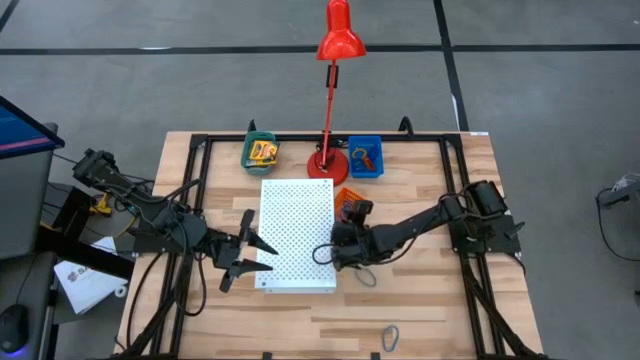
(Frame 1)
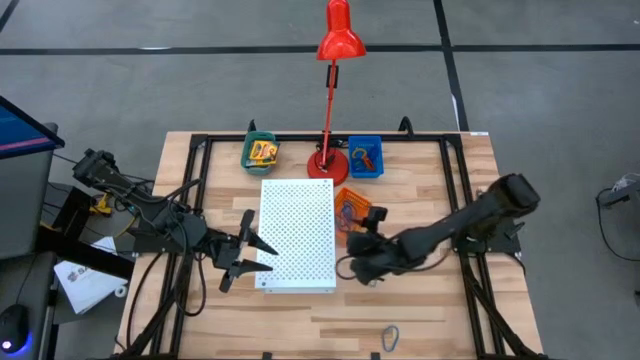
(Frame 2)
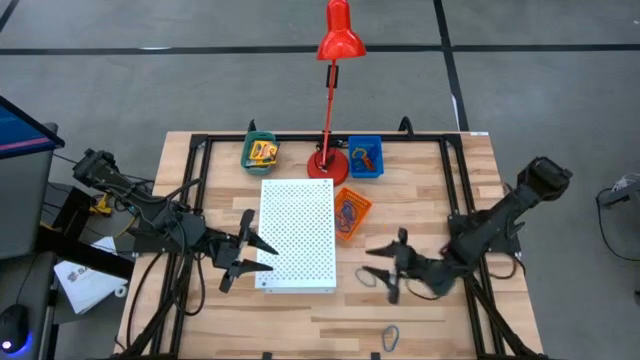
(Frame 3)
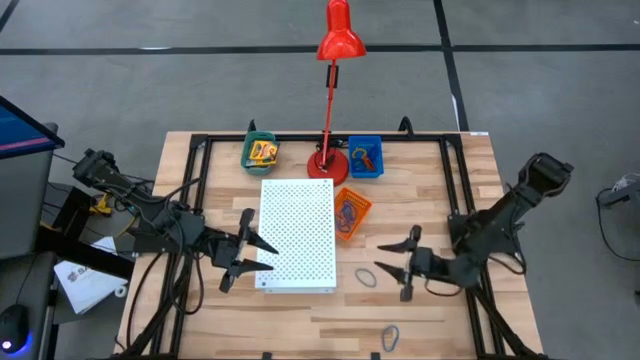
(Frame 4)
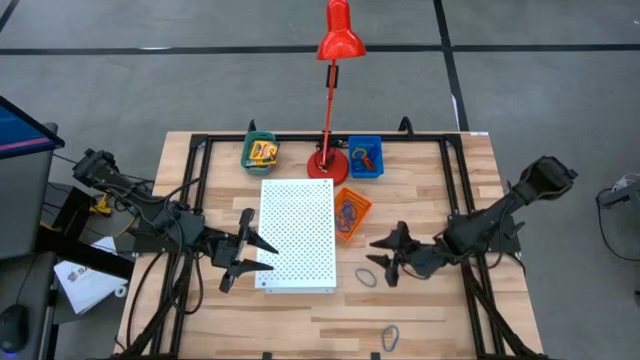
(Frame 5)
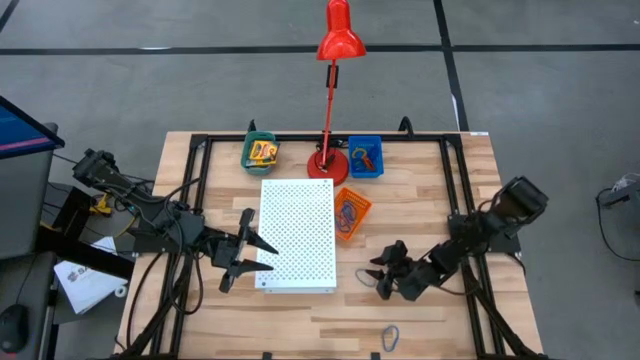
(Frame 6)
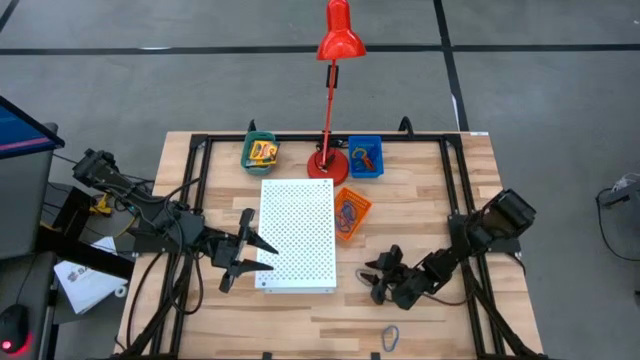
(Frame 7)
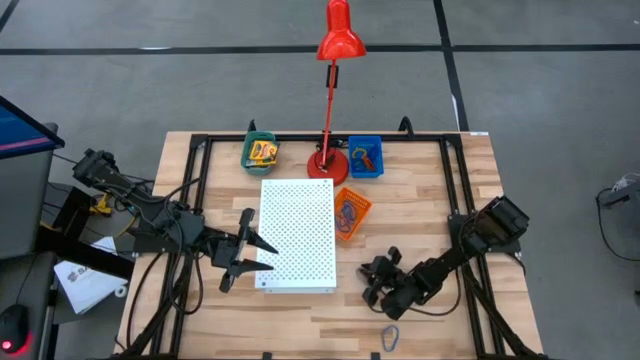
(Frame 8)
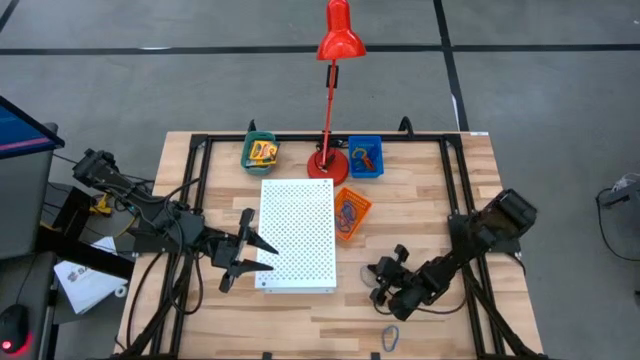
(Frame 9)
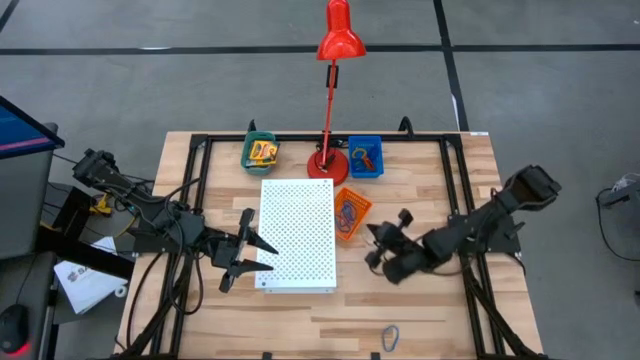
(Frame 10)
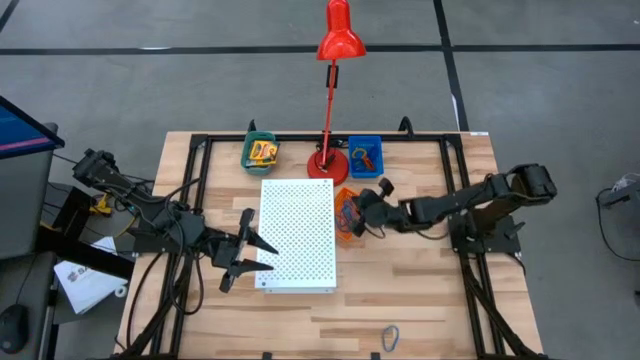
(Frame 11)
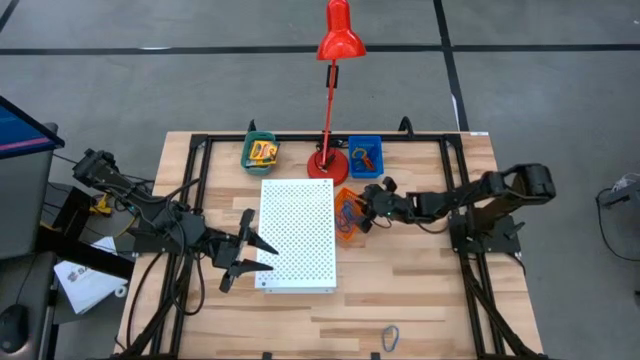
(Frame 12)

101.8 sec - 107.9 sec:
Task: Pick & Place Office Desk Supplies
Put the blue rubber band into the orange bin

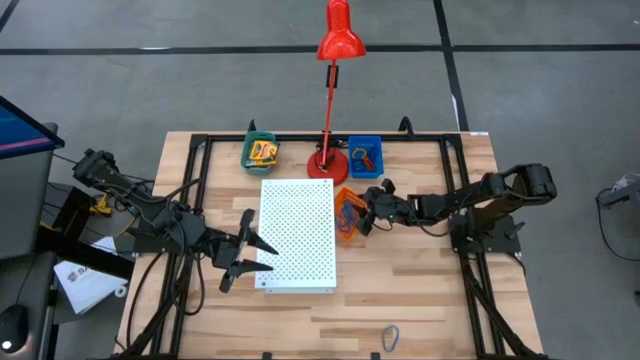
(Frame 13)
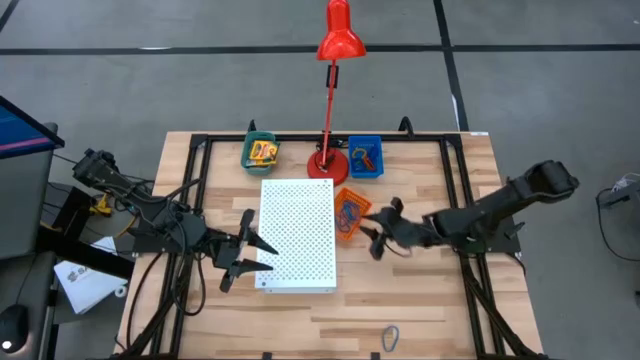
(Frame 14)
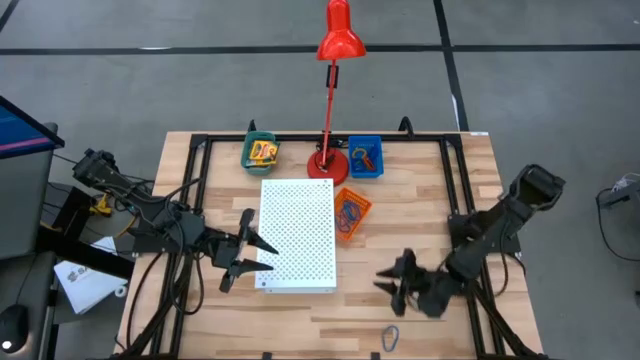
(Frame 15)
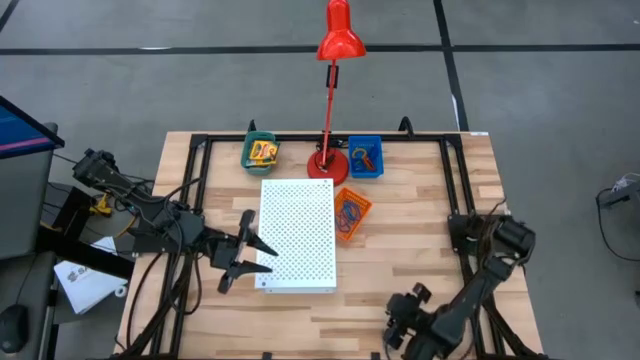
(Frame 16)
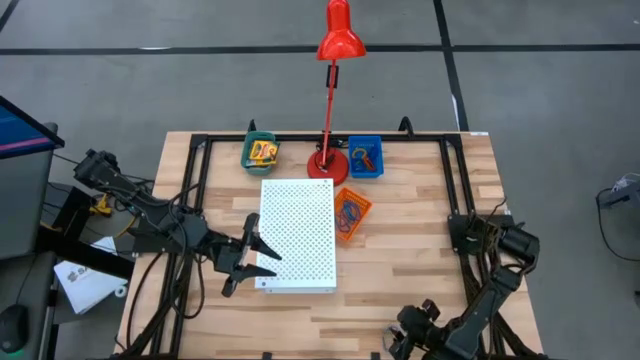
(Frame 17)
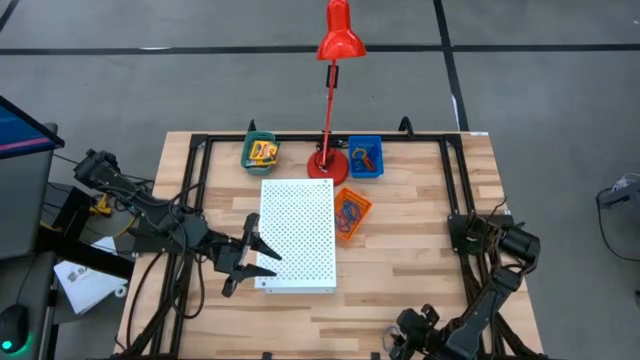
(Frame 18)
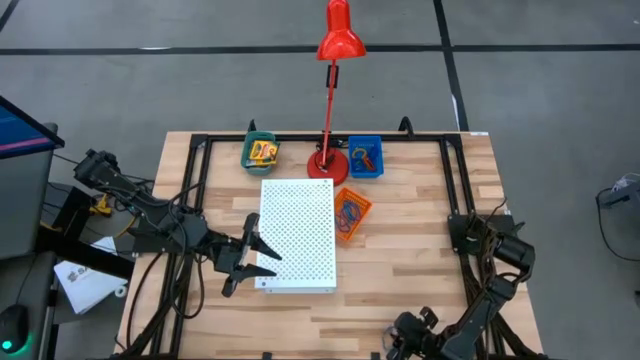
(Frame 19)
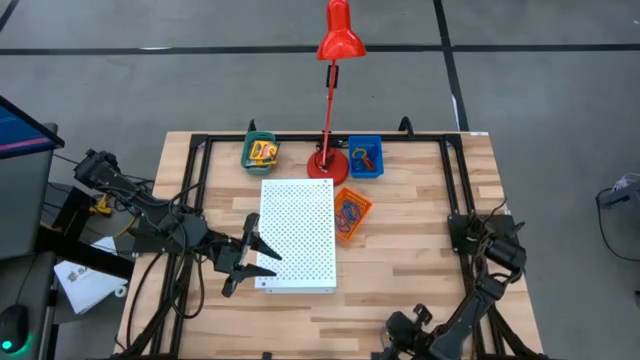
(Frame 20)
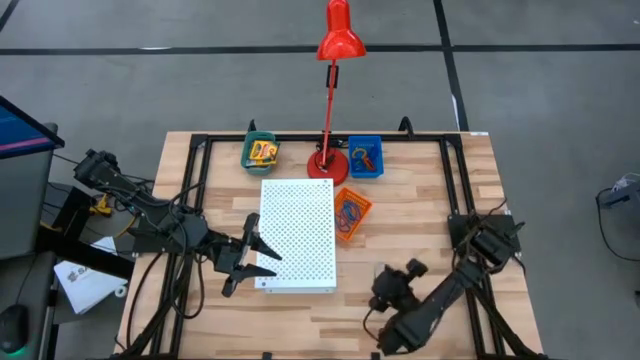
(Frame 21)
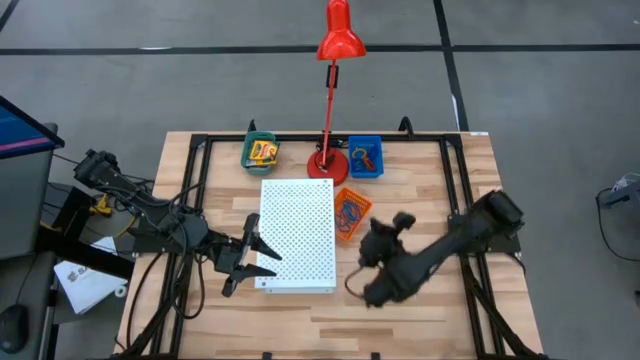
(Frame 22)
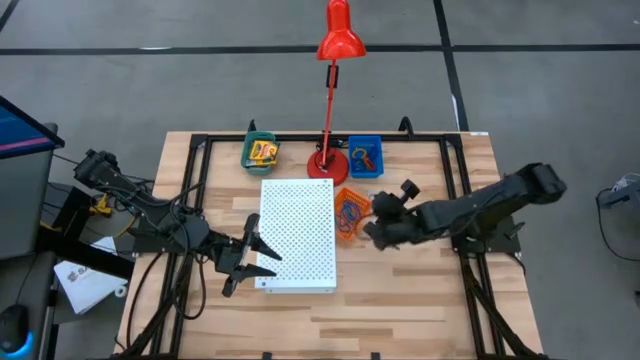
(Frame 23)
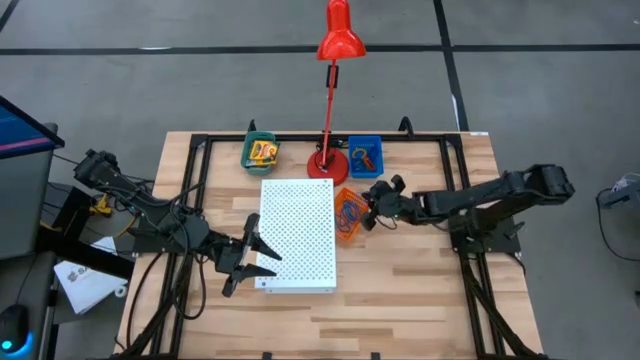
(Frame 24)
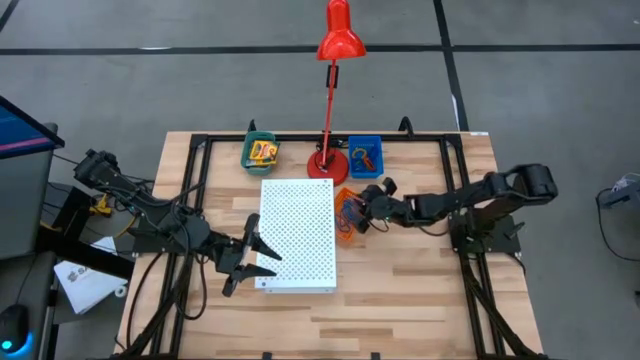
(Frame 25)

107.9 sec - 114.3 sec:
Put the blue rubber band into the orange bin

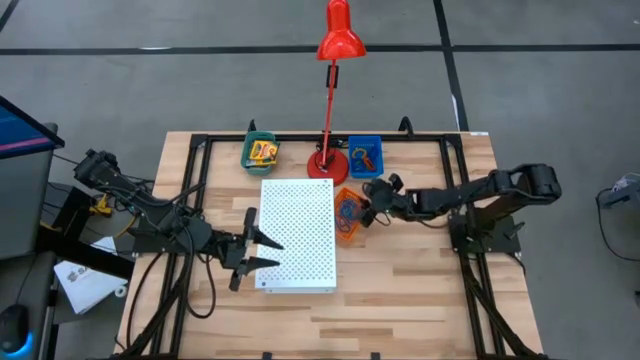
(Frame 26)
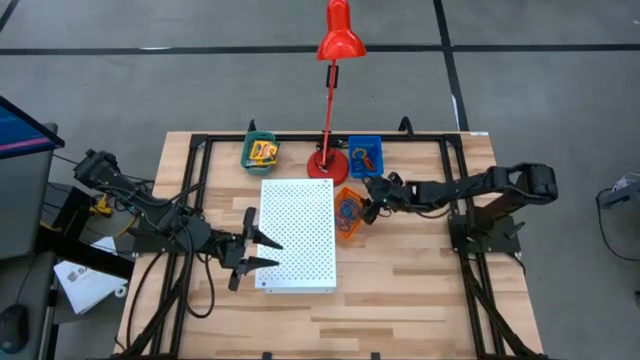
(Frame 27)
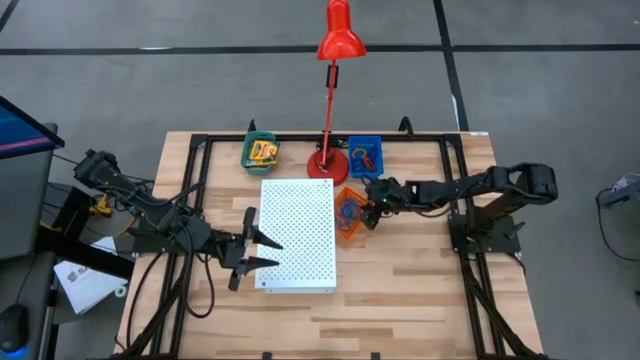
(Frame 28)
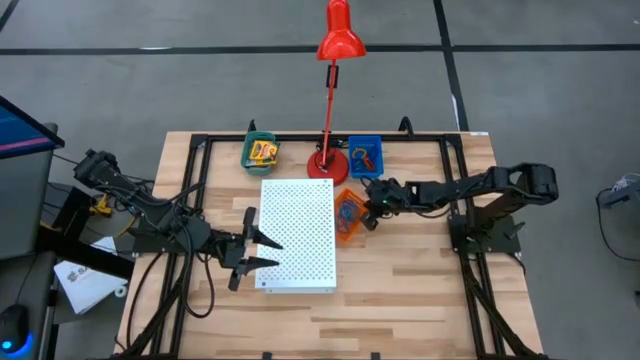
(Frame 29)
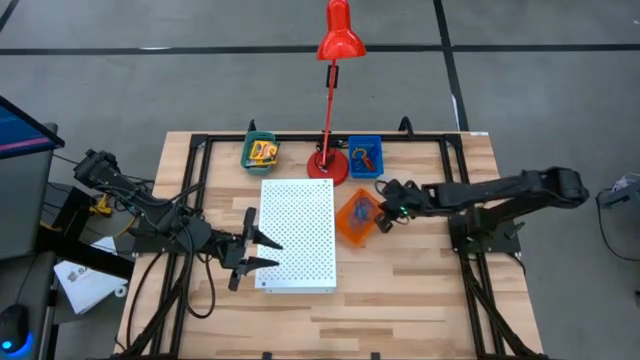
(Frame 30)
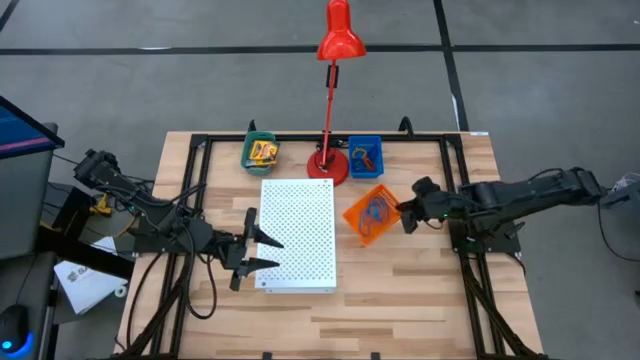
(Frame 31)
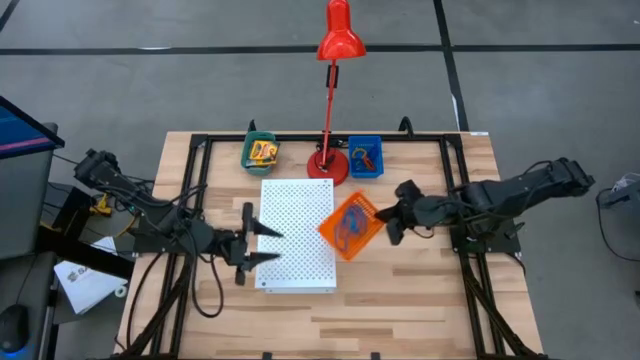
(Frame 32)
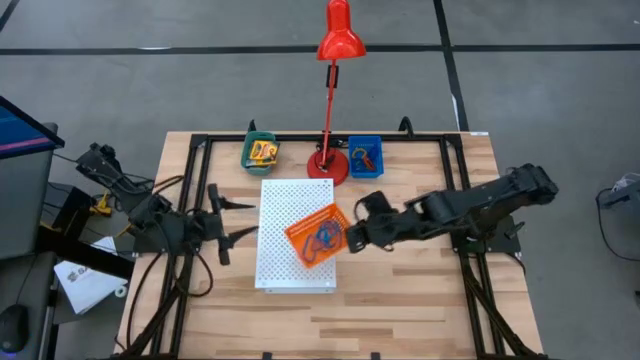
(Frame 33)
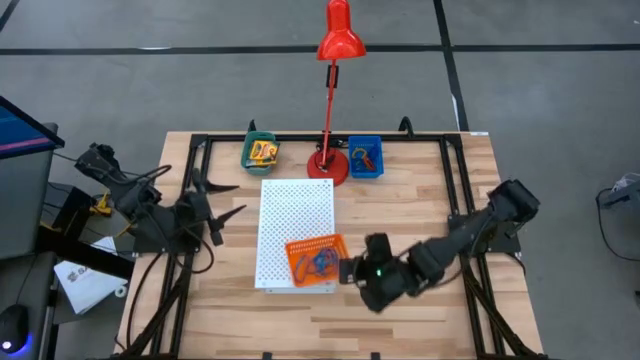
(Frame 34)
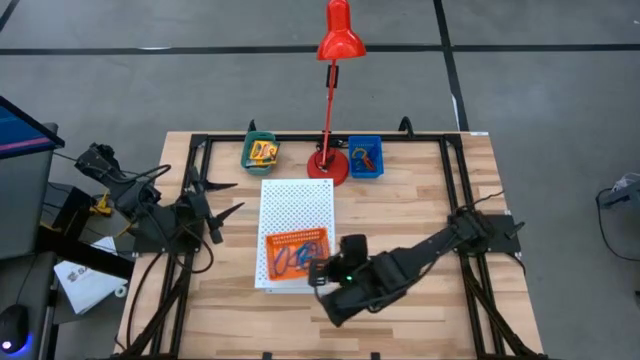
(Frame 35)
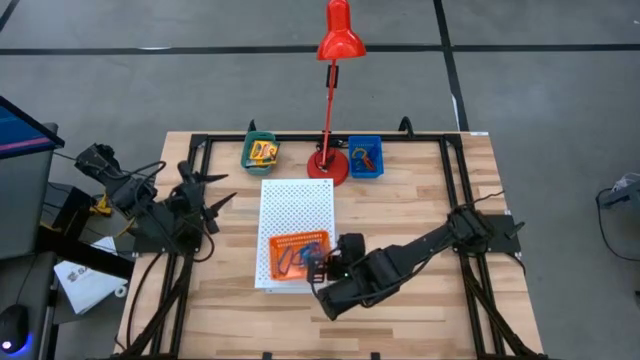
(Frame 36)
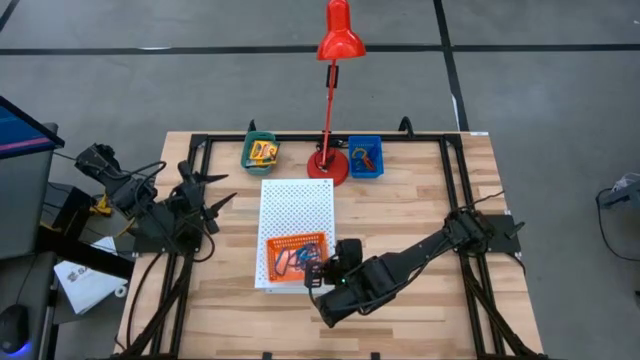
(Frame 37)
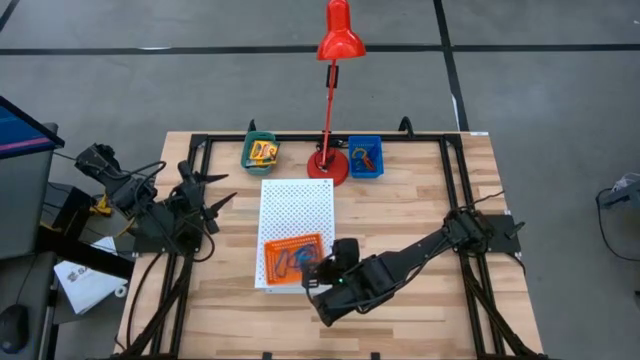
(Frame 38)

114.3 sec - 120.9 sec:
Put the orange bin on the shelf containing rubber bands

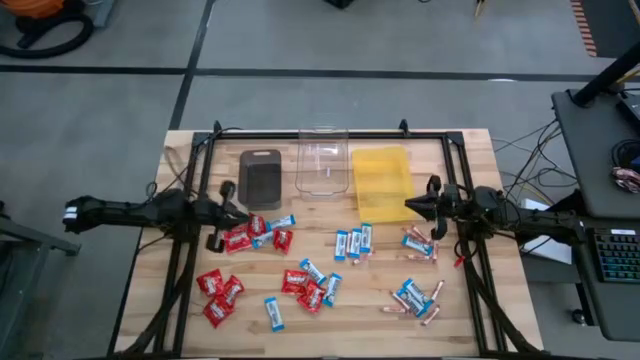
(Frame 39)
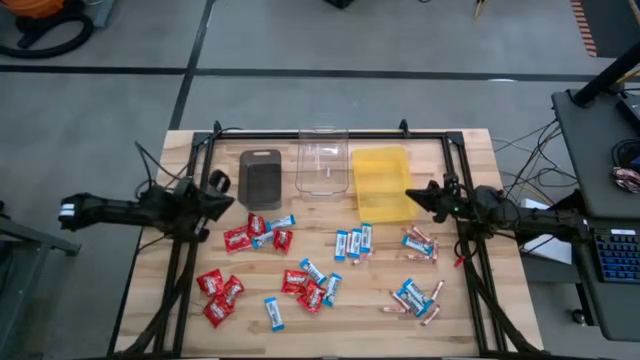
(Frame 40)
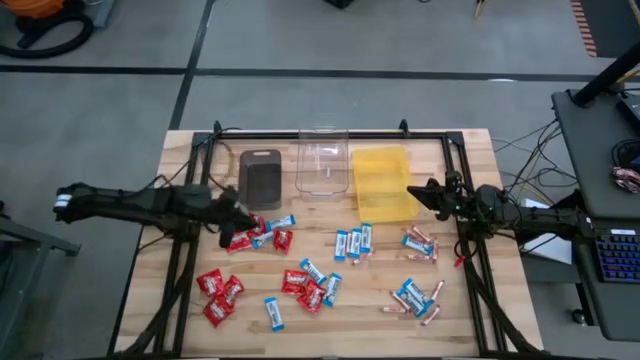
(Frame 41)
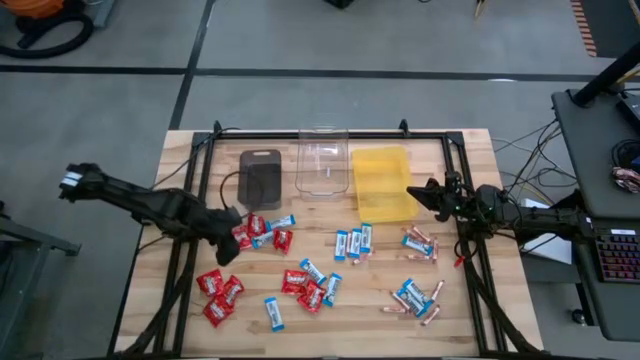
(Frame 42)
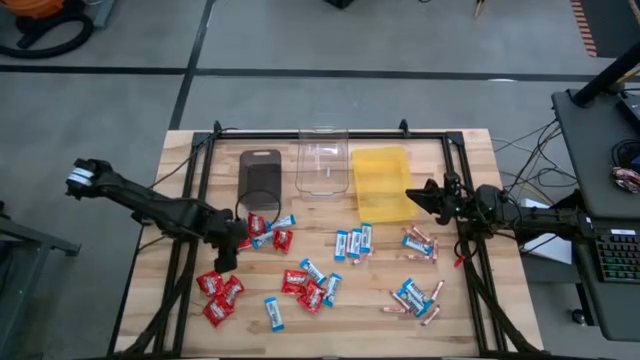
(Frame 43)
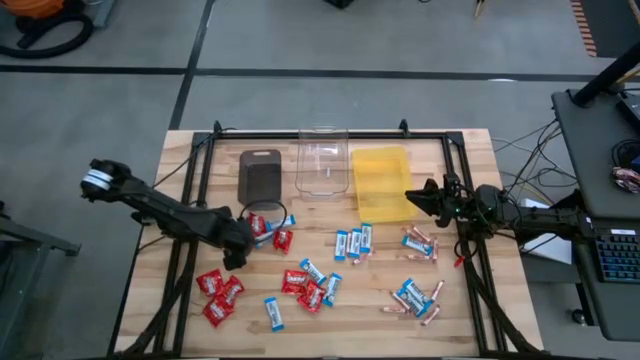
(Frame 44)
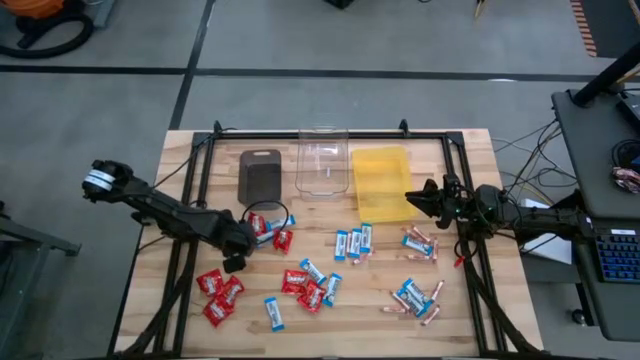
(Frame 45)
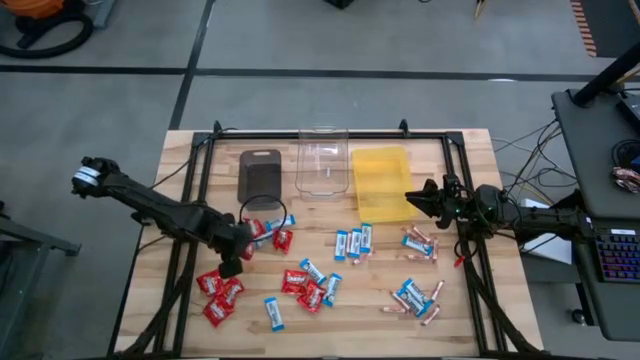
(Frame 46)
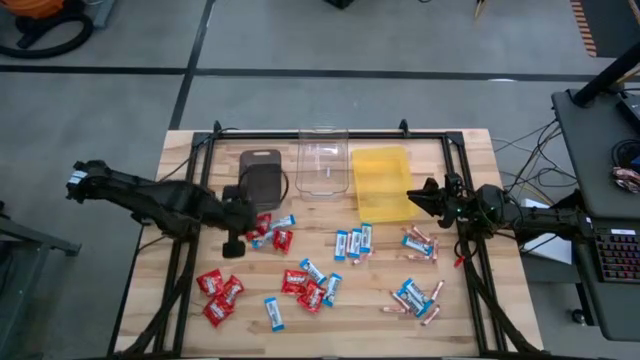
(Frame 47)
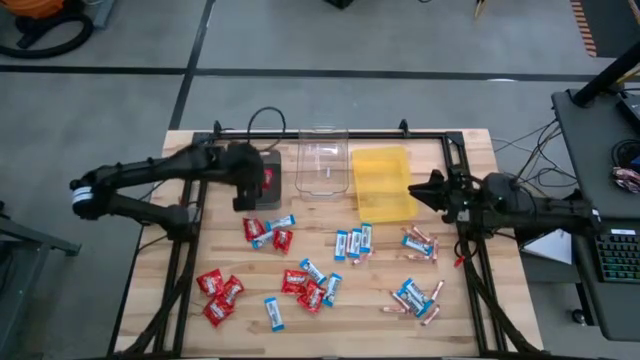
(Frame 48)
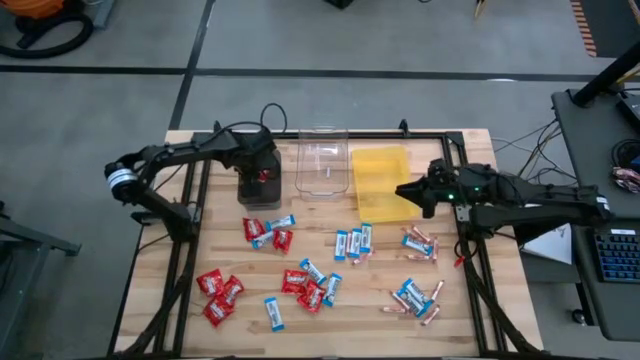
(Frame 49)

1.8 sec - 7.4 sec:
Task: Sort candy
Put the red candy into the black bin
